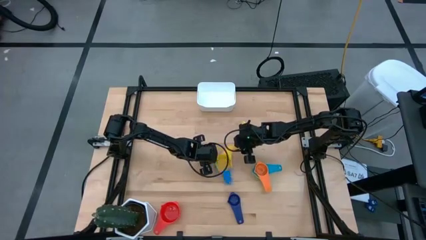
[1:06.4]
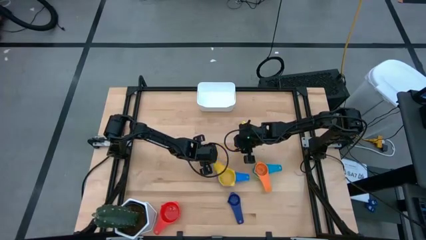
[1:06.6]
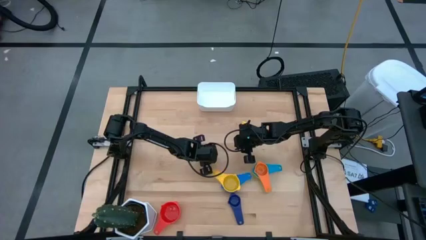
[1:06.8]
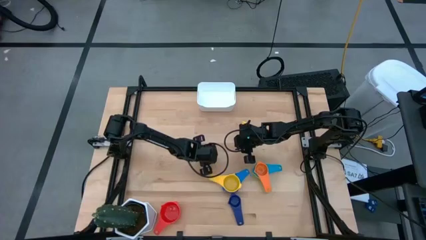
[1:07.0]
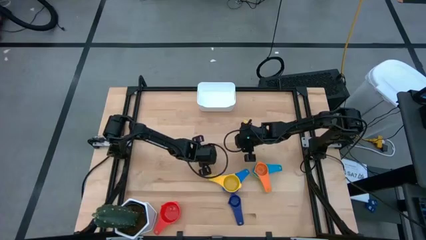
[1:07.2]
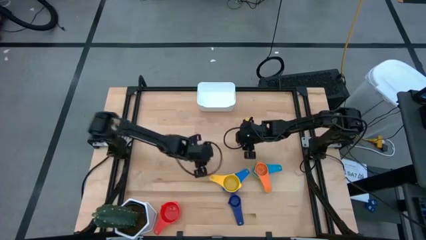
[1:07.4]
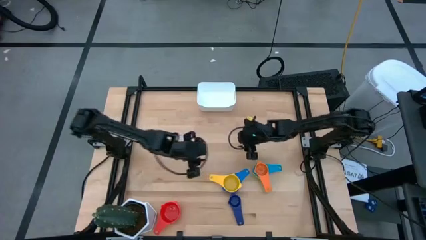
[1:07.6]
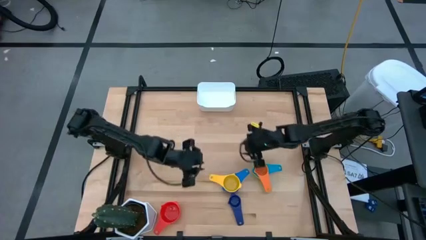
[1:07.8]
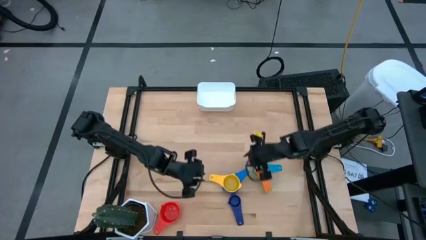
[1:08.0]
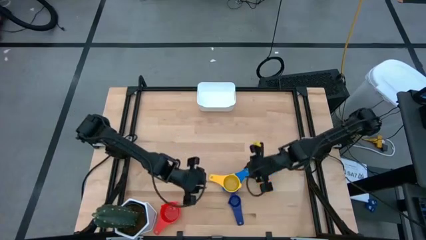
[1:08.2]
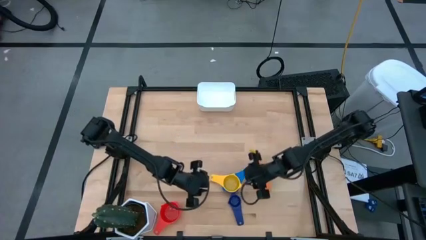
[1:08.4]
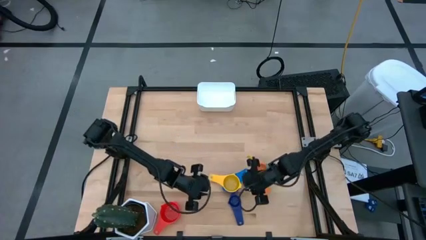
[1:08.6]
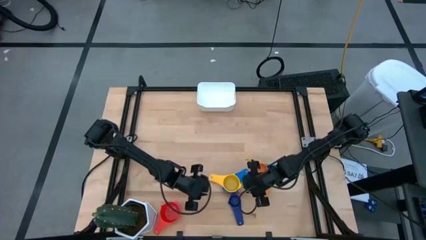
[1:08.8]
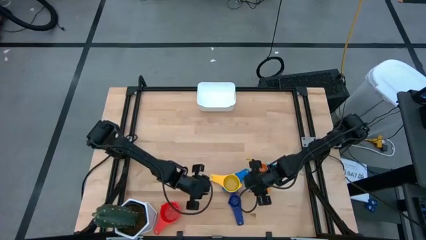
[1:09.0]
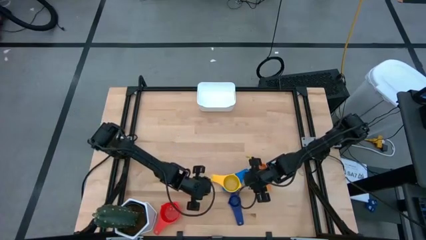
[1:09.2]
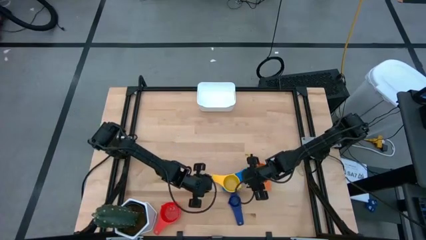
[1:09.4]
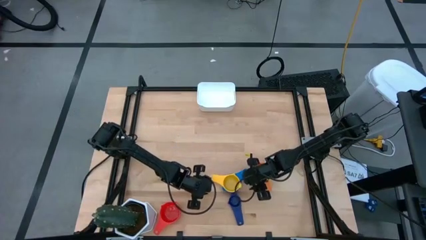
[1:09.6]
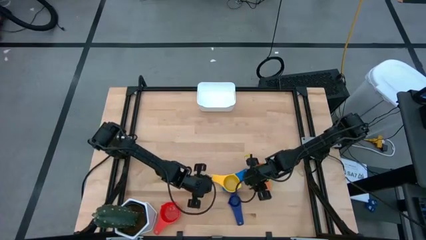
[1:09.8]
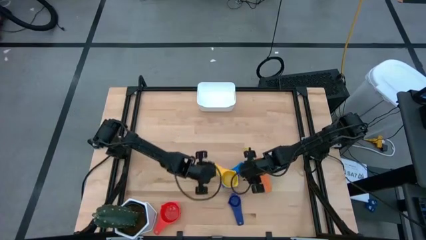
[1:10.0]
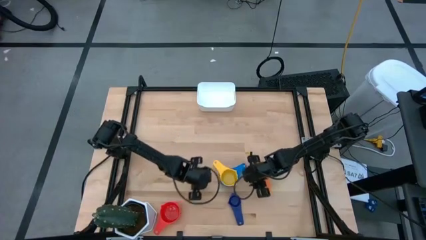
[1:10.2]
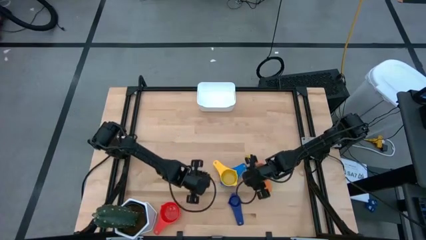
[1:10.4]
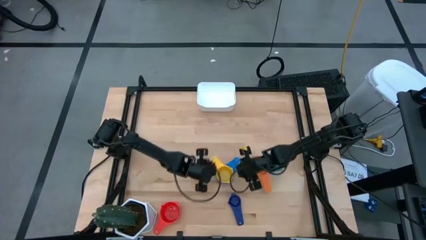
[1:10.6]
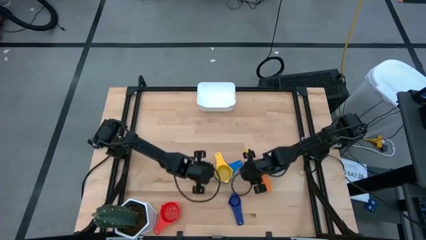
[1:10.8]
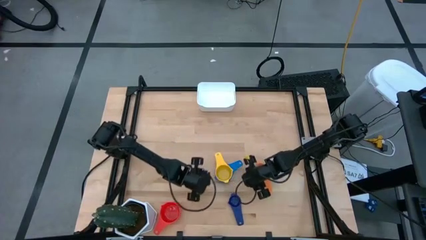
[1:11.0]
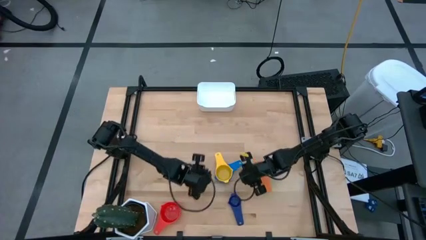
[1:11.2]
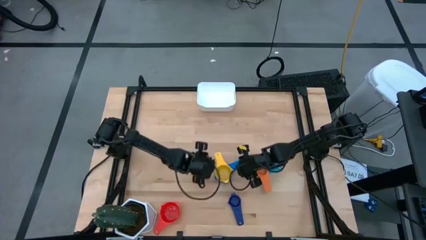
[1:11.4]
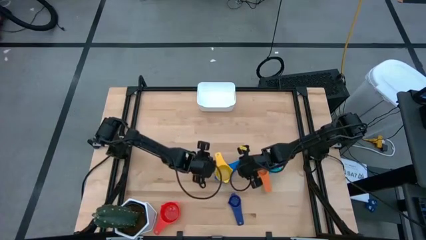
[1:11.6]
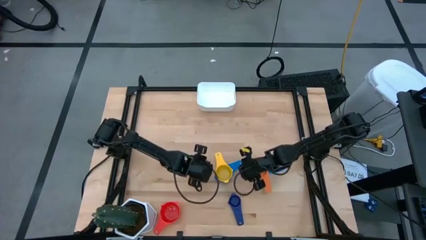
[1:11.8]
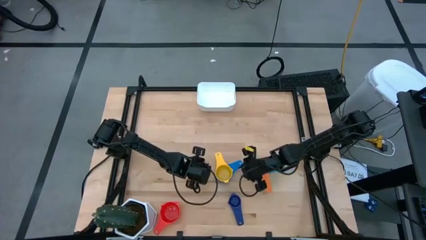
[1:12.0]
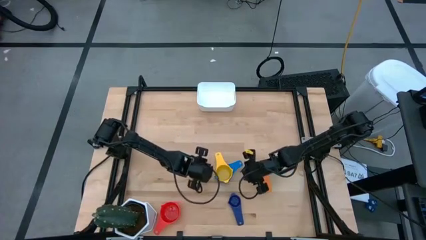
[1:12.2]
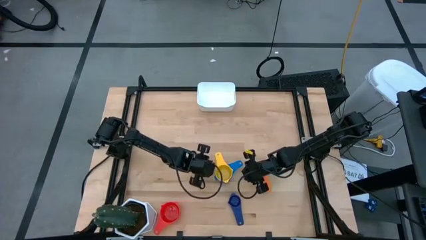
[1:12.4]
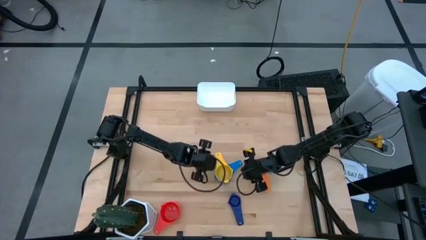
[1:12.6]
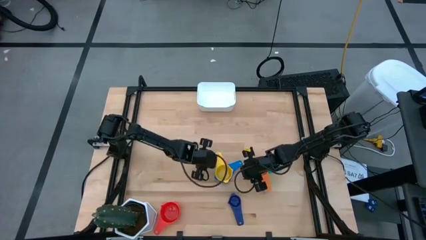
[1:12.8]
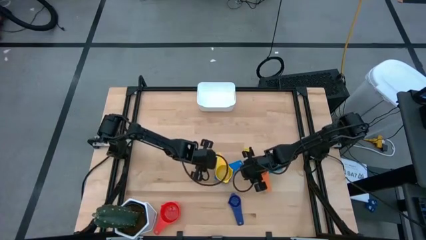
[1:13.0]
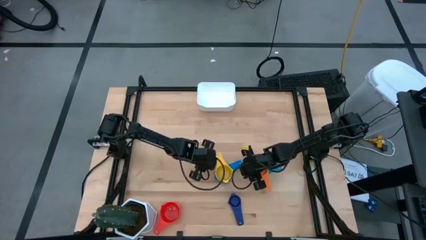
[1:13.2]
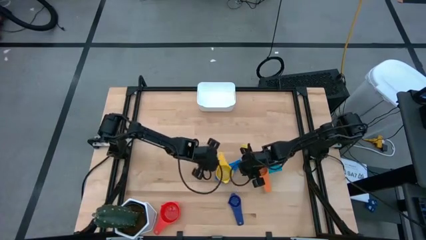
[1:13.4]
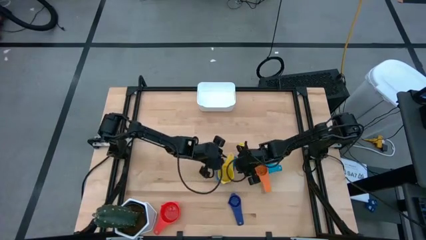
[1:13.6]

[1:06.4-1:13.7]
Task: Nest measuring cups in basket
Adjust the left nested measuring cups

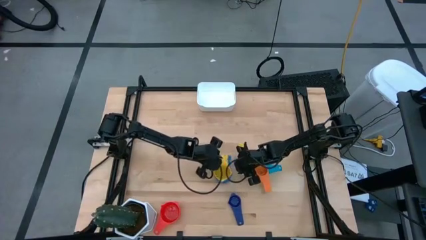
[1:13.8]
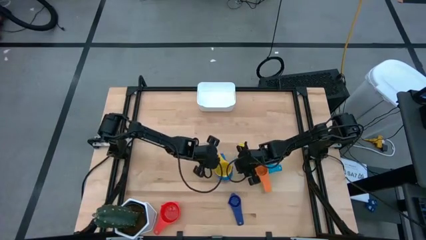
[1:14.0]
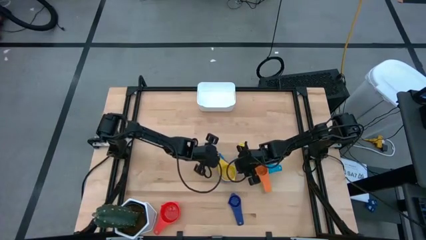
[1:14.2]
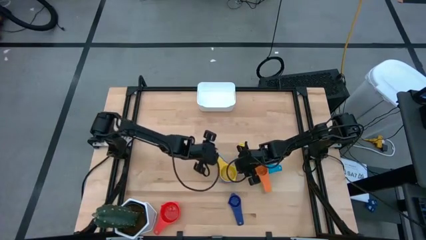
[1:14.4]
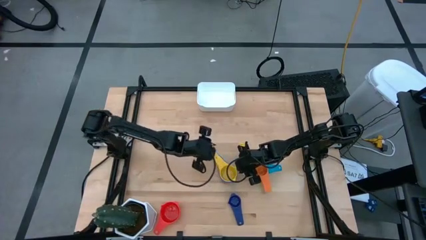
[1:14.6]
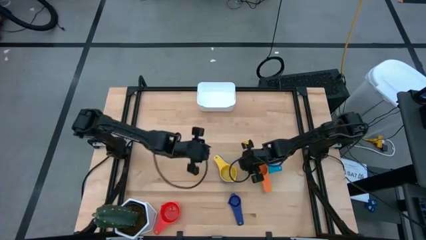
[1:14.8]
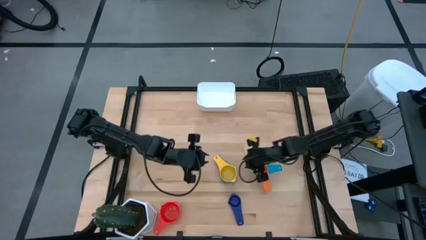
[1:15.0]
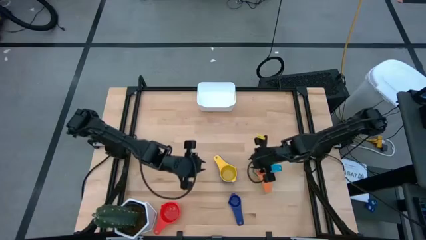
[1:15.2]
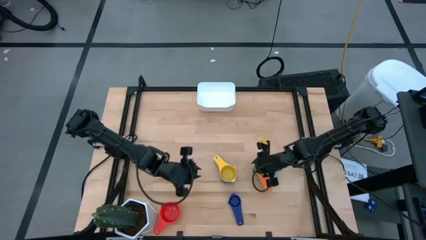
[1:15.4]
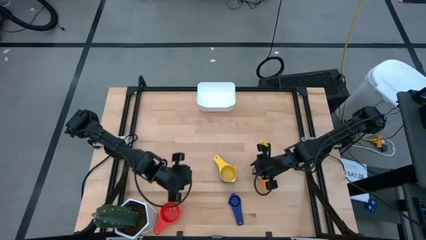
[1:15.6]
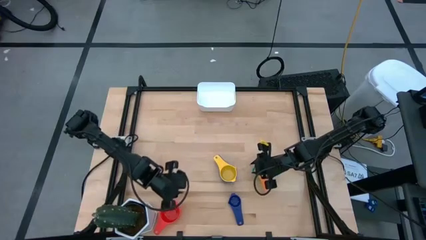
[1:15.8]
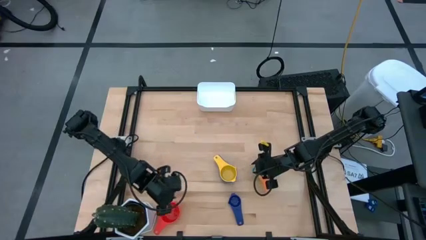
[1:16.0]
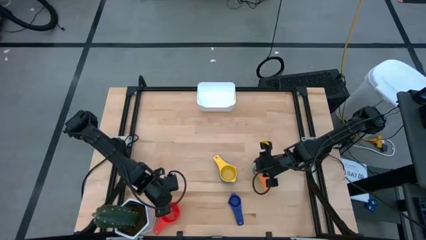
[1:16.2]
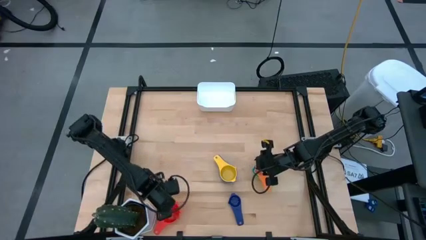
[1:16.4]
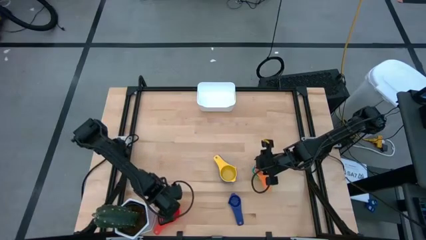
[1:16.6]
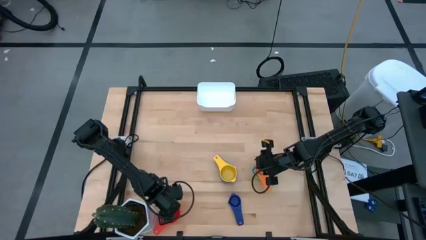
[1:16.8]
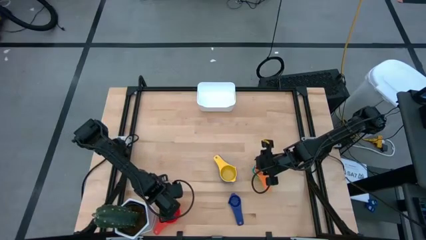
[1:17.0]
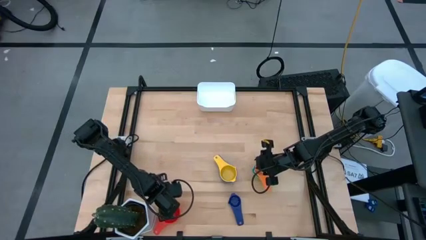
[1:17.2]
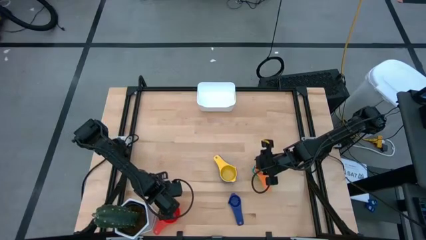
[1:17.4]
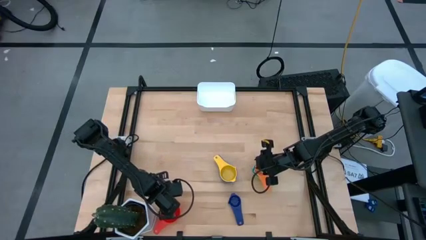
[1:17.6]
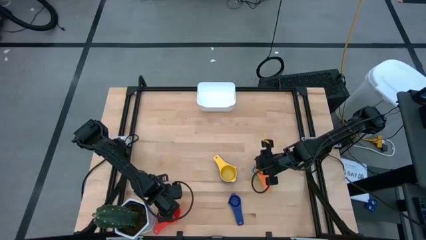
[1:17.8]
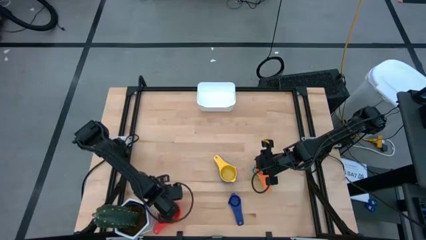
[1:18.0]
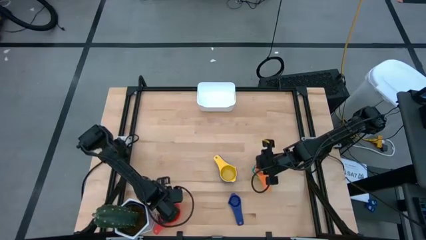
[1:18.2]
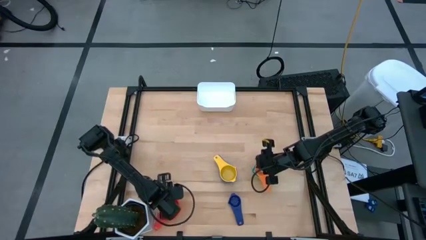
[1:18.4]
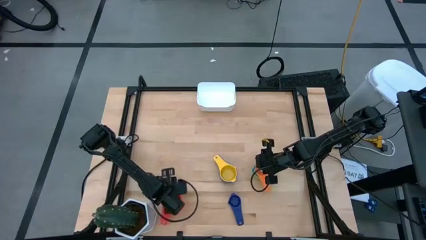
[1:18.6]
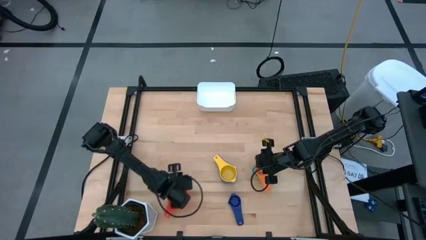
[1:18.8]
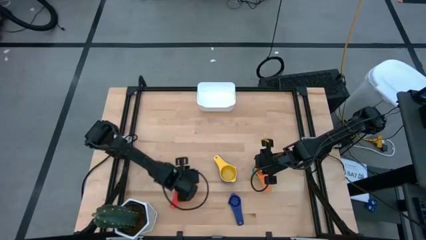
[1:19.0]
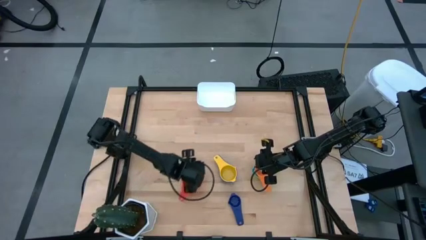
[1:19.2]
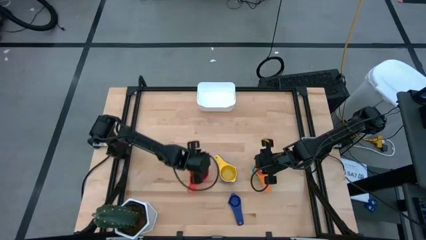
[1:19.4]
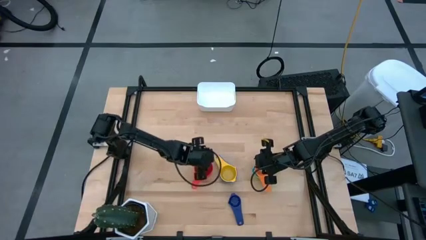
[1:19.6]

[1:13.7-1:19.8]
Move the red measuring cup to the center of the table
